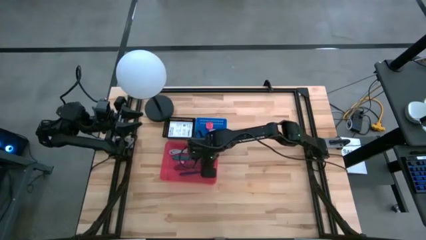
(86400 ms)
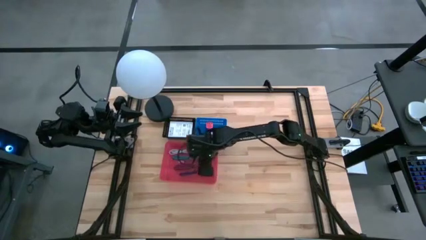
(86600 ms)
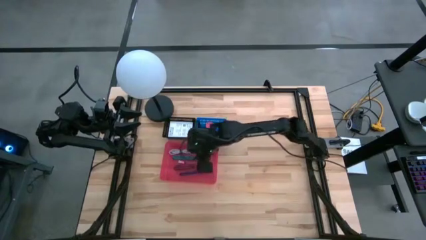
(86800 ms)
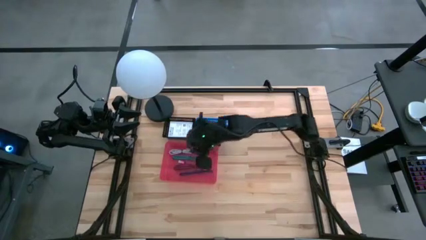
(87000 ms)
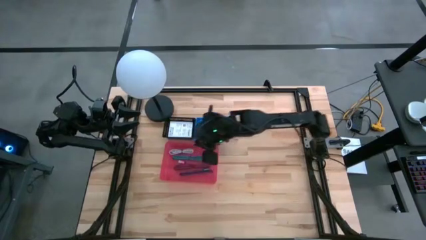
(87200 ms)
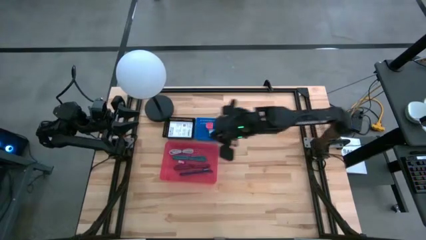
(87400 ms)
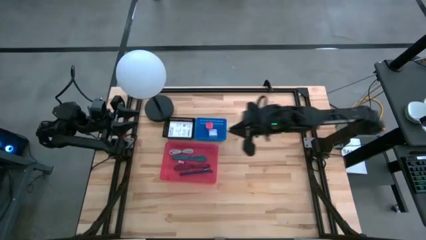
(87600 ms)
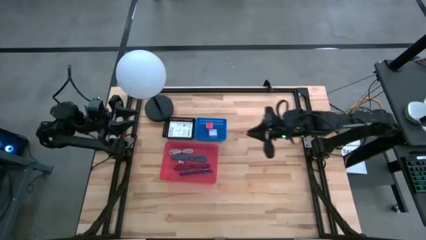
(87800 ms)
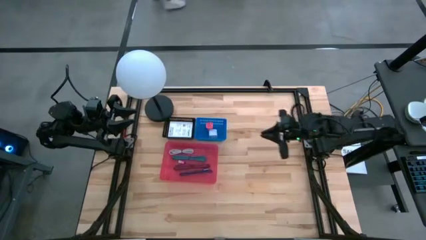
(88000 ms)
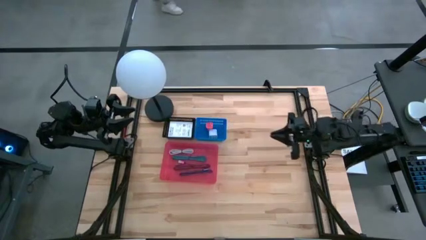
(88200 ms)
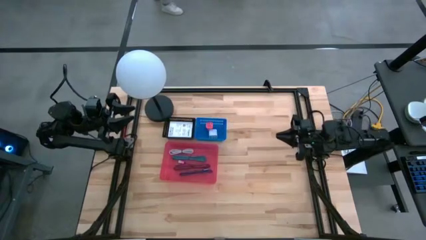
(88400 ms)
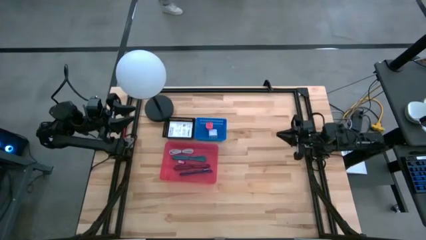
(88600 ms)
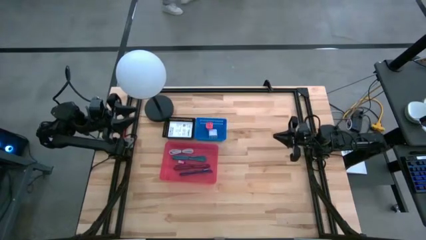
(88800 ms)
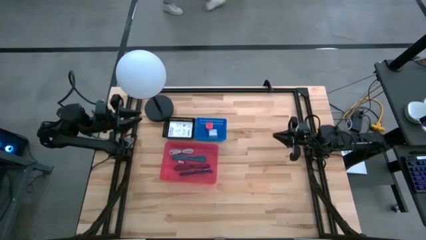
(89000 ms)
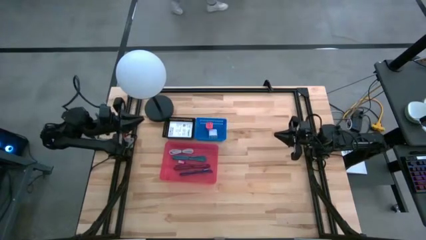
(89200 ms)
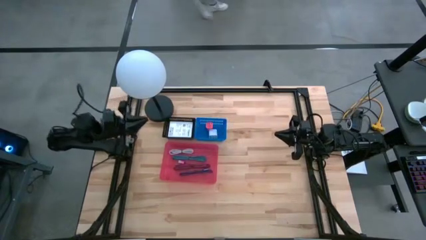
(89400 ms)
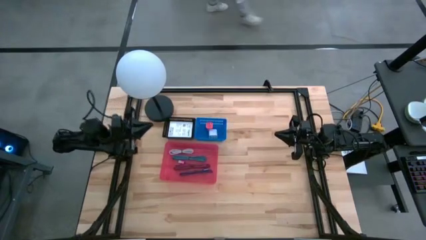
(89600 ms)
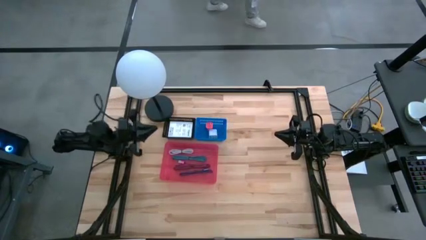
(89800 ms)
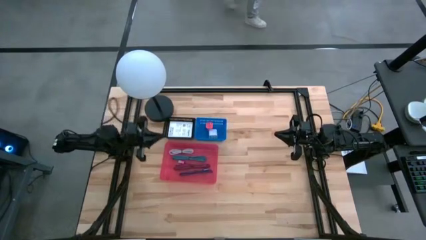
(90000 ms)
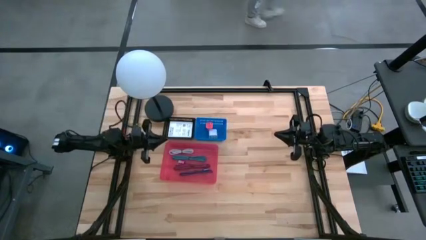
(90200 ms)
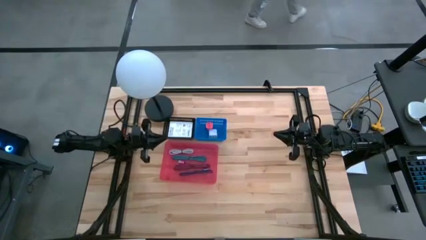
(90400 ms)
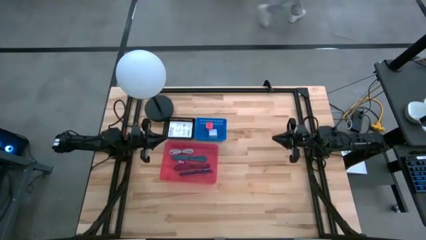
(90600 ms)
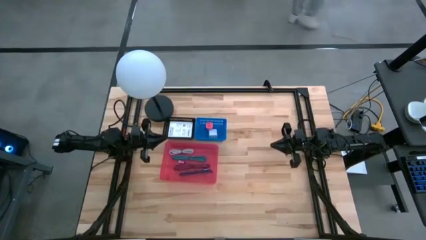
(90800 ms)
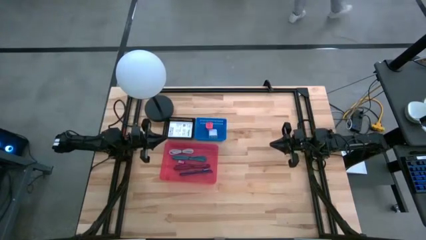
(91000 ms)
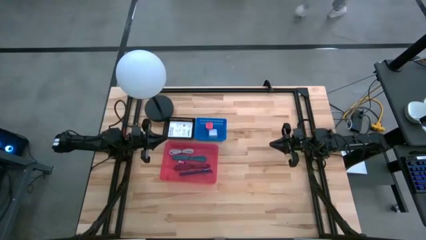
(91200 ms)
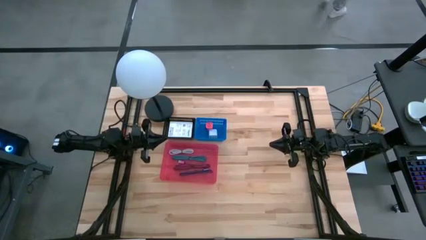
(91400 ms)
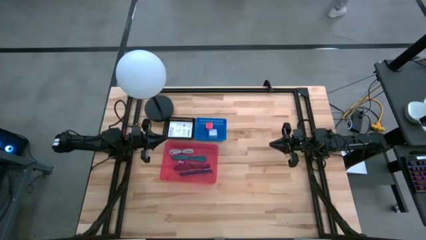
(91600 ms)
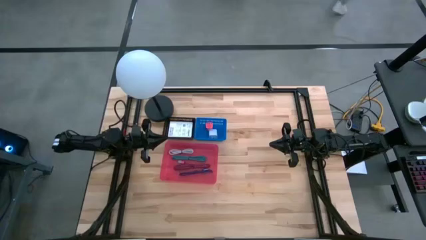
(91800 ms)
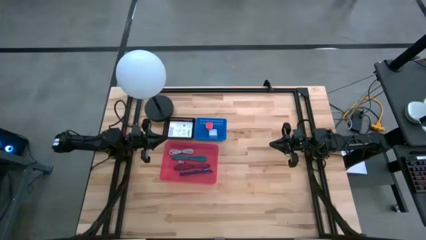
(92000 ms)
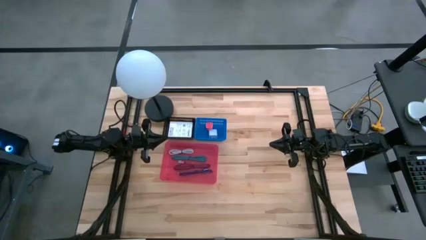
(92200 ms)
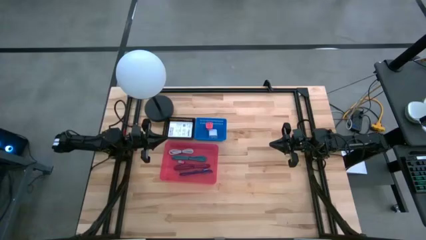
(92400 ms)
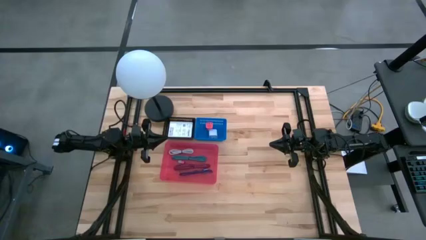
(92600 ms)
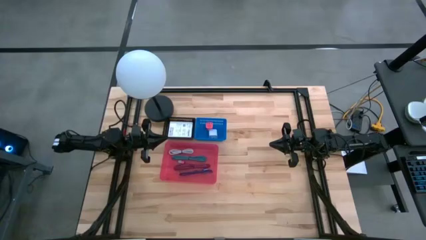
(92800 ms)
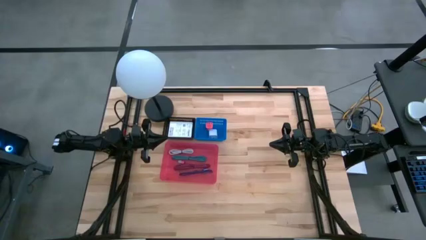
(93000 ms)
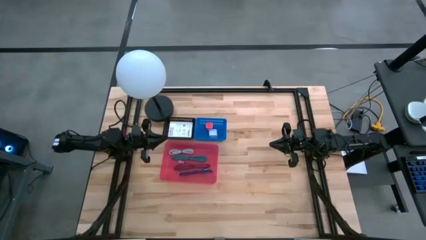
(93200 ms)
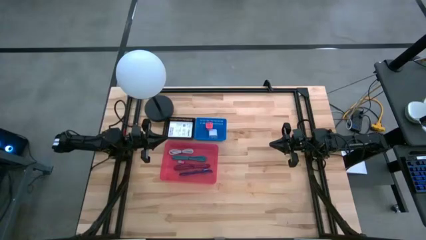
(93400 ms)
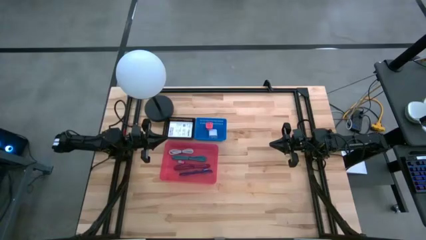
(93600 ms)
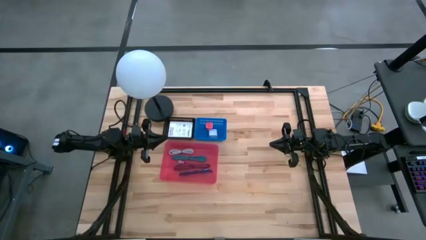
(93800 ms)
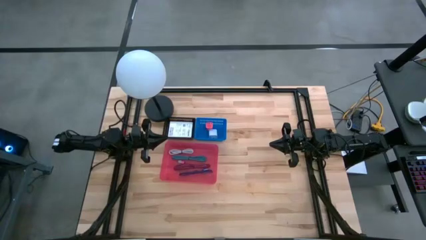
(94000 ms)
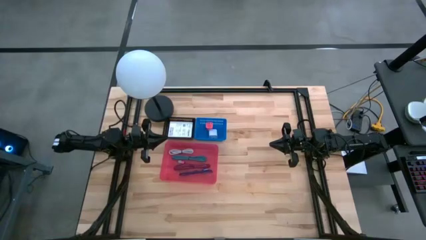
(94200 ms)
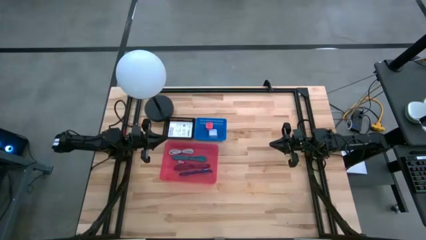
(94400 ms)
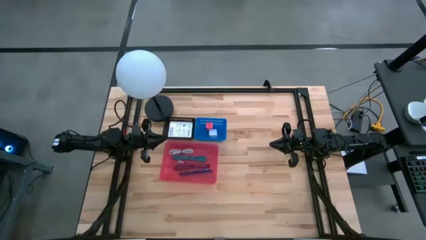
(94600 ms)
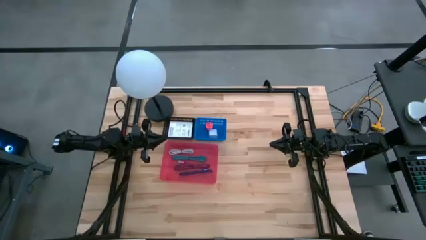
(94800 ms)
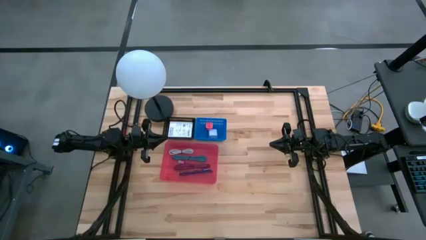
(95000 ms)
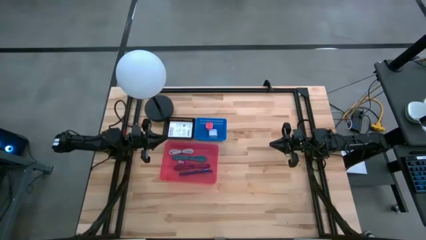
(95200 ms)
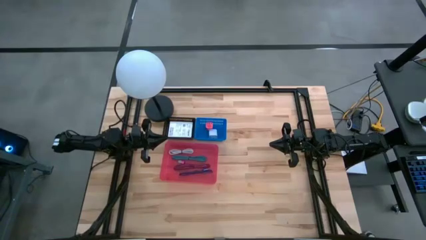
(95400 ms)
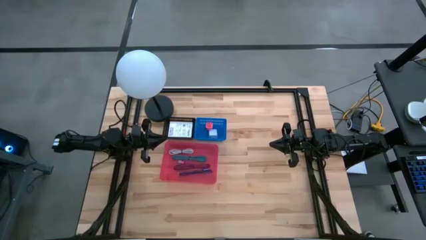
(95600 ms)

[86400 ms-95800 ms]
Task: Pick and place items into bin
Return to Home Position

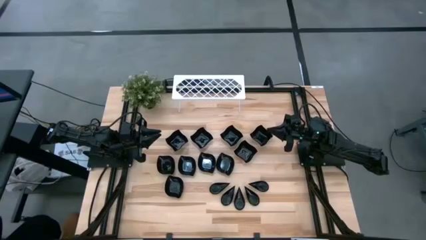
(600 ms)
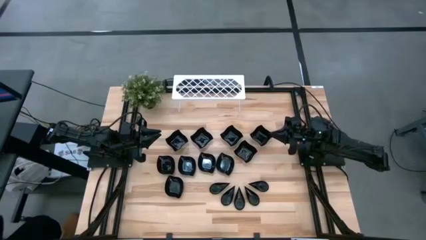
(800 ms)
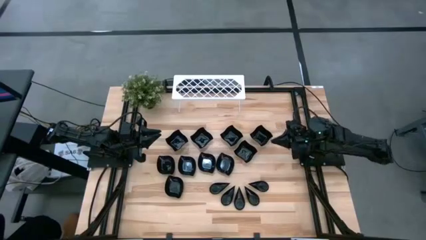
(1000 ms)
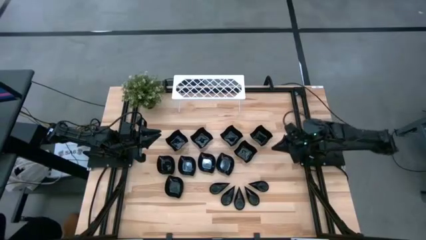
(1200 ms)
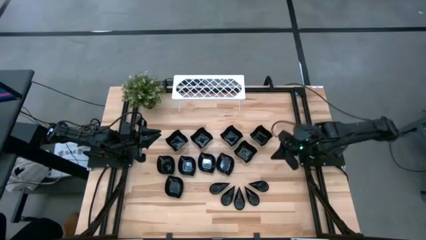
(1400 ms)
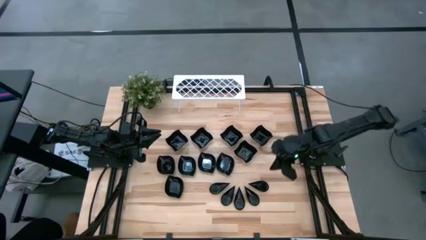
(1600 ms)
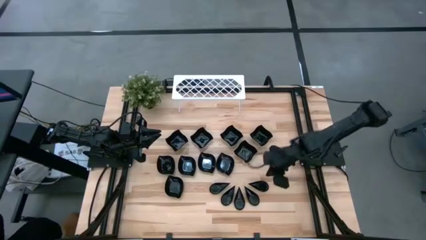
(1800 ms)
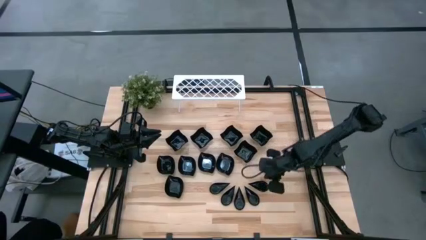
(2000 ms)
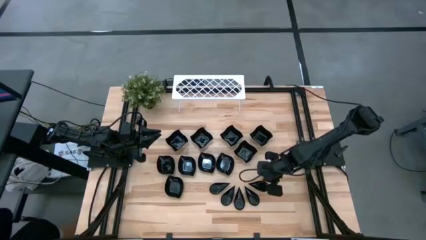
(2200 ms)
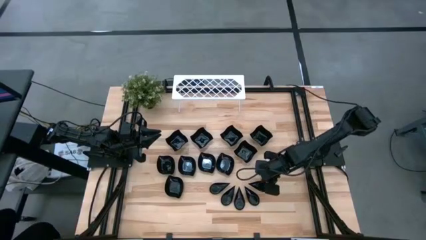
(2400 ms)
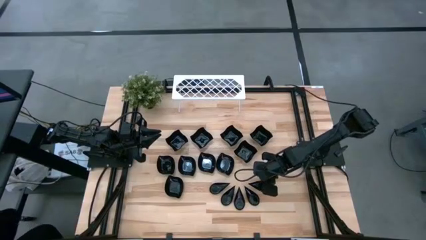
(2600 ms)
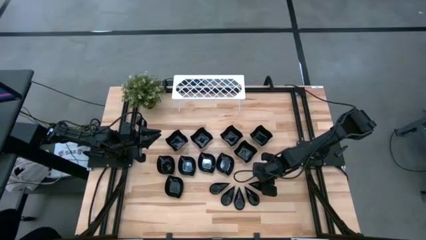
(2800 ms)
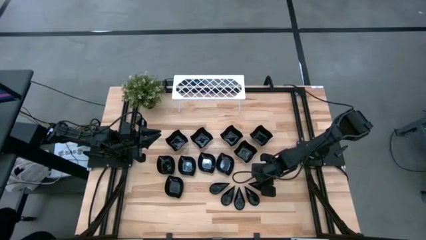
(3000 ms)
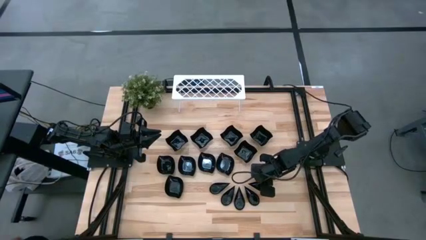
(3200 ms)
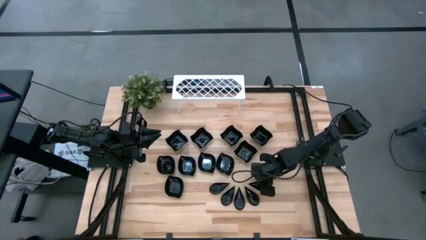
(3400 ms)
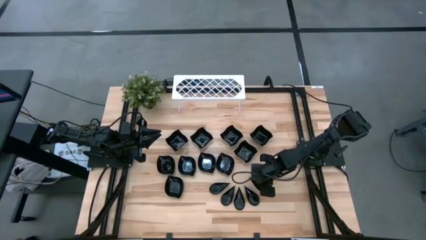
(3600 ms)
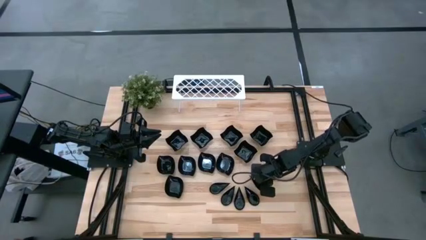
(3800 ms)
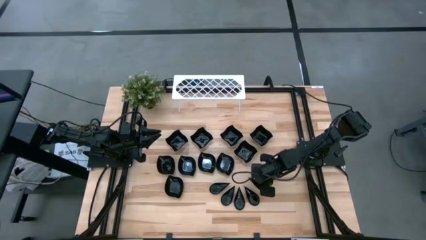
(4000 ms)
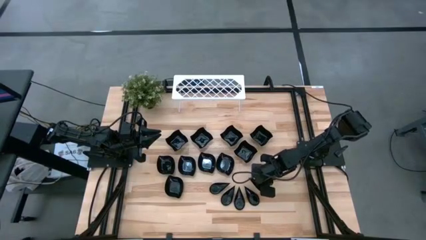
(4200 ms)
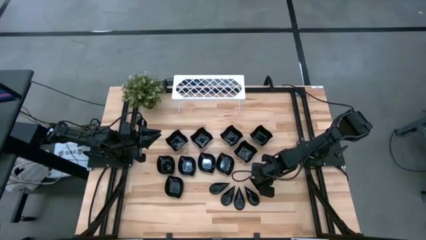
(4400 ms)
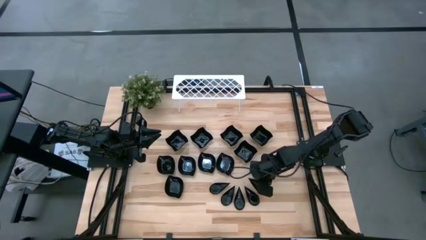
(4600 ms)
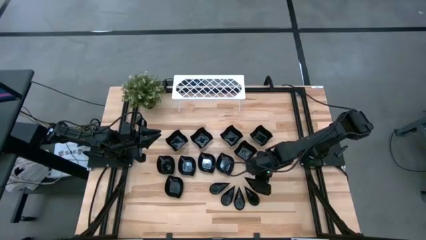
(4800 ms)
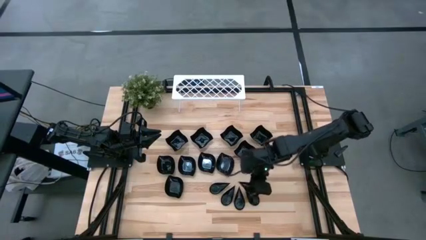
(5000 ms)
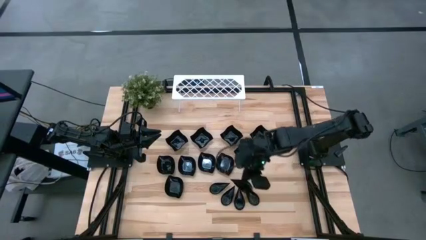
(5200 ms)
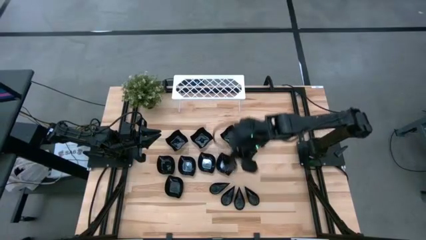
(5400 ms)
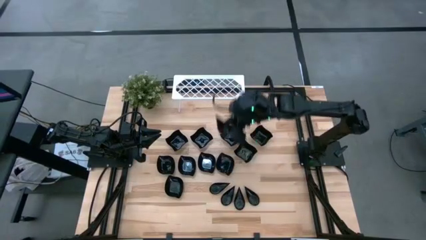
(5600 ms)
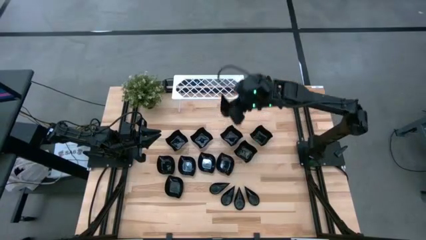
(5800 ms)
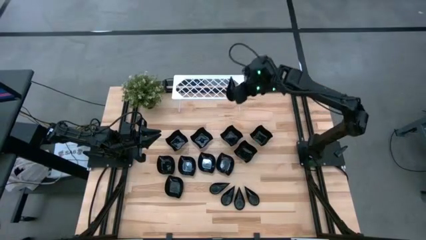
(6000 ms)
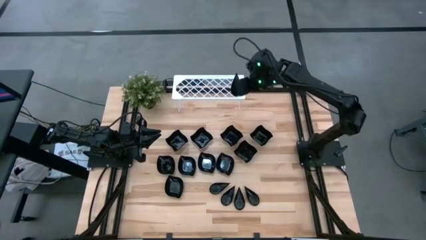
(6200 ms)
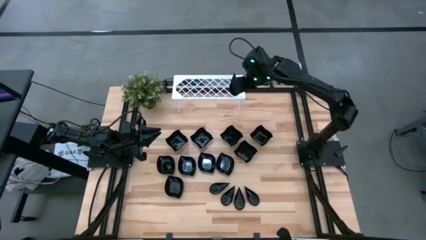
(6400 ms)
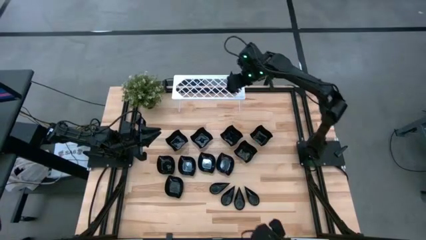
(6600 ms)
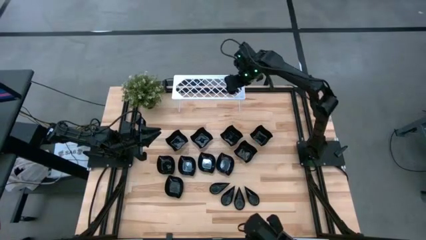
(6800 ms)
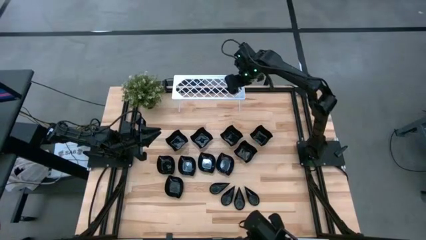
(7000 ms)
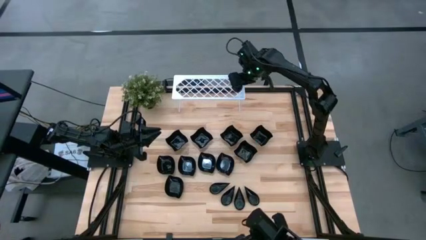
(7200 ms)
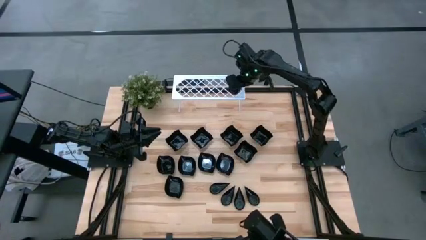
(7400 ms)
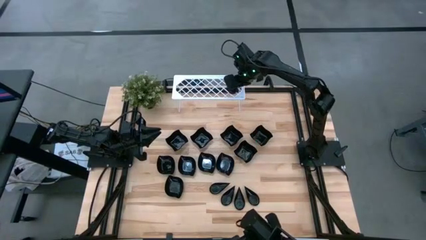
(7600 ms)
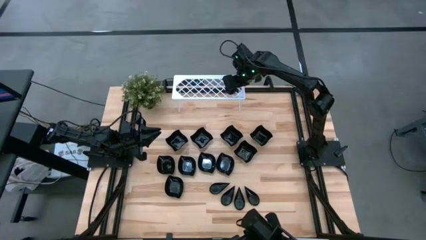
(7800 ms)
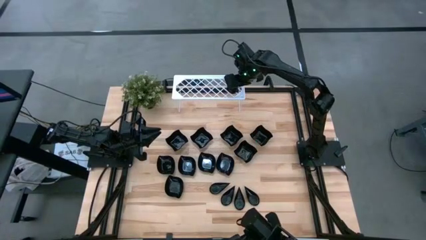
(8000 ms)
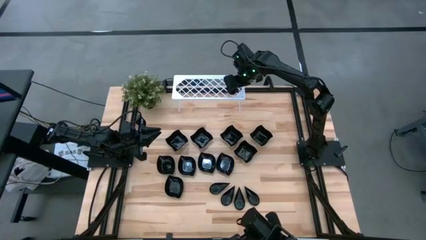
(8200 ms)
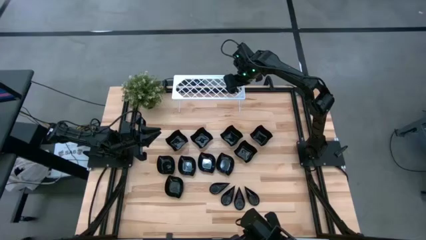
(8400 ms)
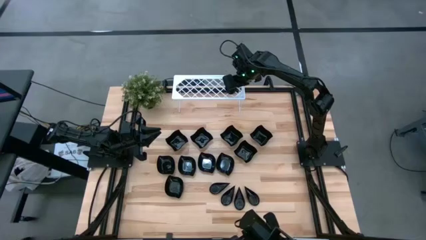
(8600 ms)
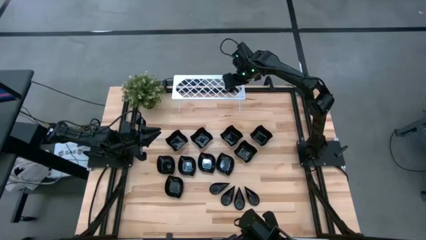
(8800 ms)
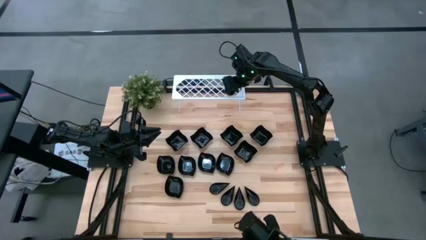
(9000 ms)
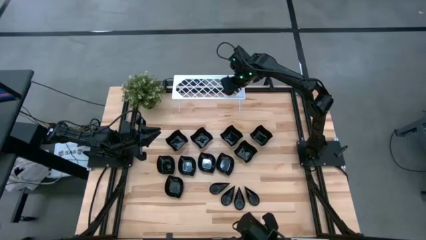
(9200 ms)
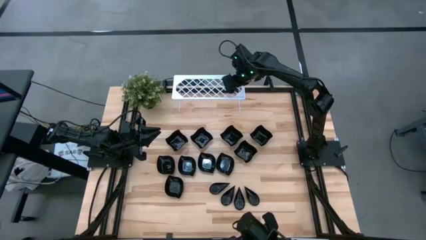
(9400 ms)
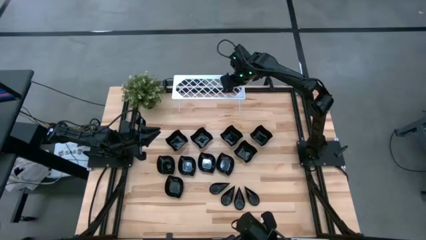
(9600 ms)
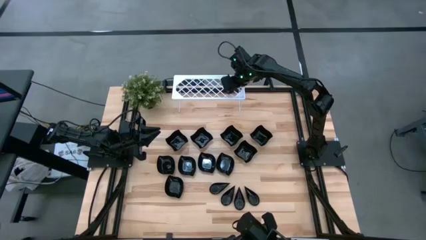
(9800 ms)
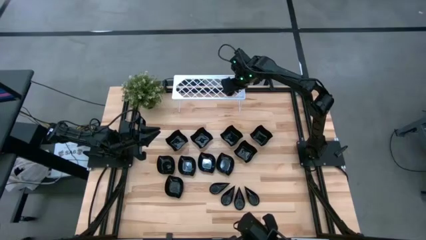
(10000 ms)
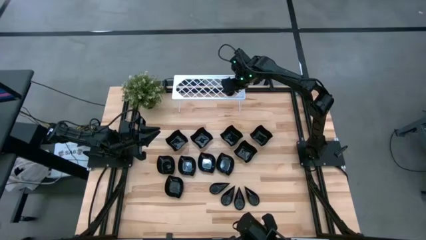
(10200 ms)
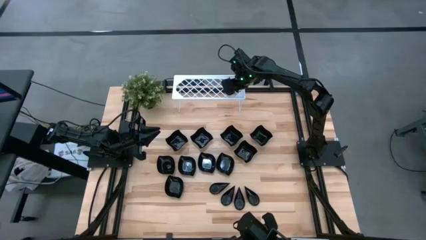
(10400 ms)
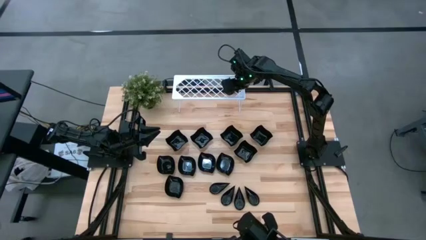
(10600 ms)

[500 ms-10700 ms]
Task: Pick & Place Mini shaped plates
Put the drop-shaped plate on the shelf
